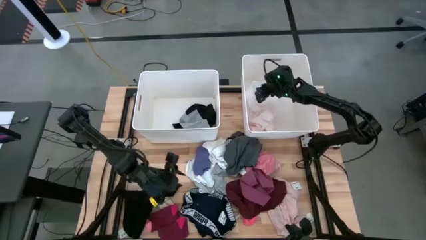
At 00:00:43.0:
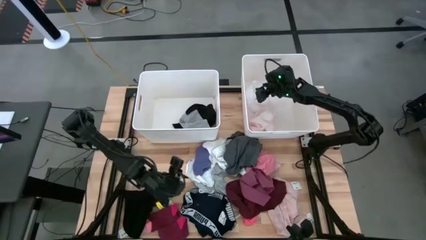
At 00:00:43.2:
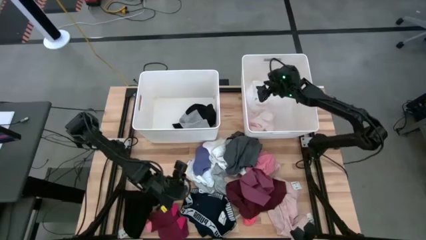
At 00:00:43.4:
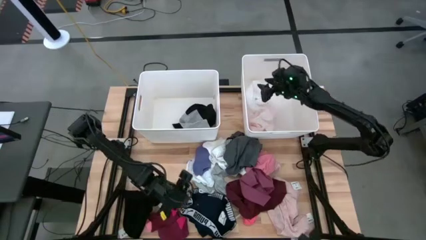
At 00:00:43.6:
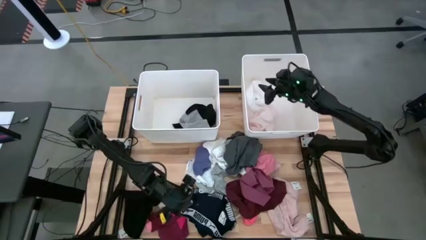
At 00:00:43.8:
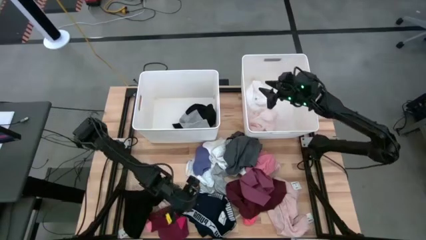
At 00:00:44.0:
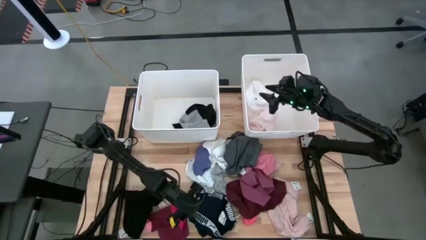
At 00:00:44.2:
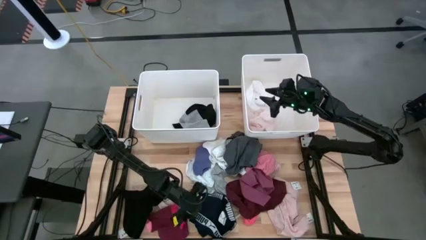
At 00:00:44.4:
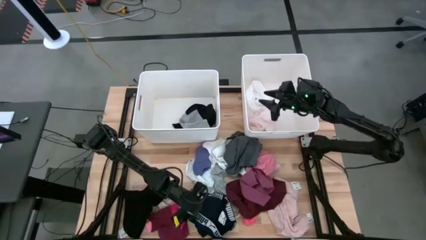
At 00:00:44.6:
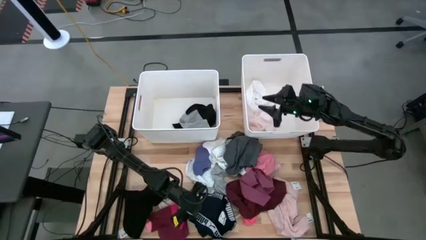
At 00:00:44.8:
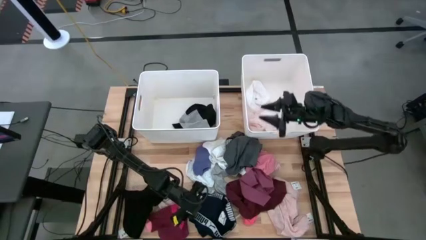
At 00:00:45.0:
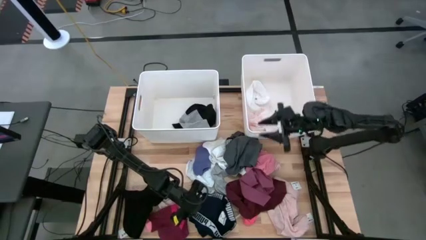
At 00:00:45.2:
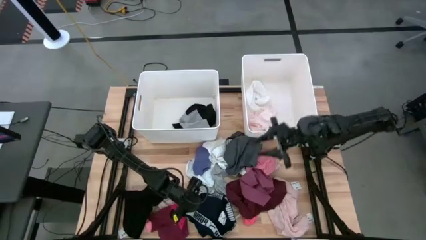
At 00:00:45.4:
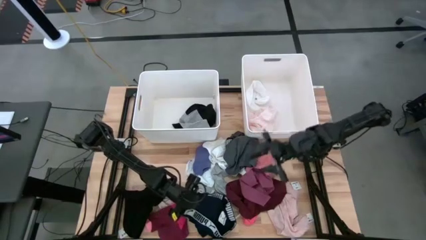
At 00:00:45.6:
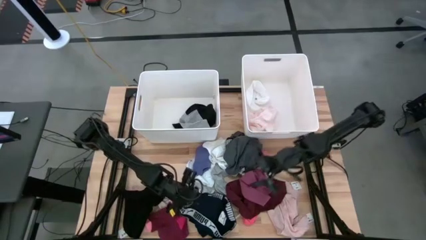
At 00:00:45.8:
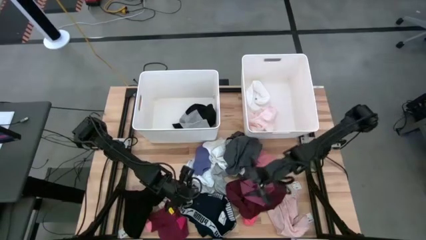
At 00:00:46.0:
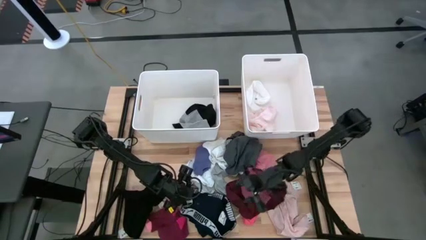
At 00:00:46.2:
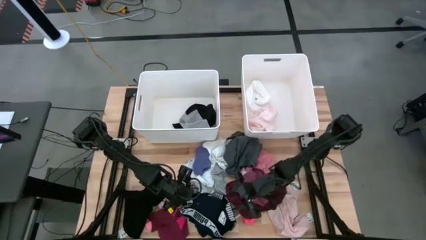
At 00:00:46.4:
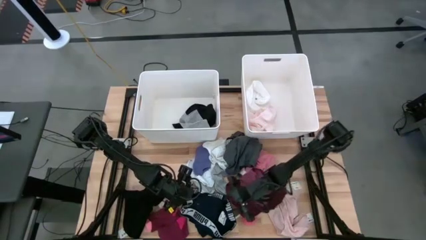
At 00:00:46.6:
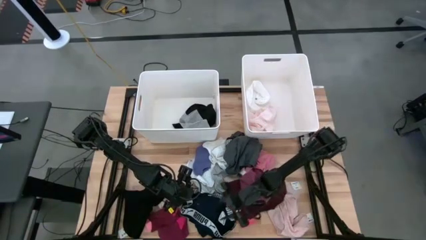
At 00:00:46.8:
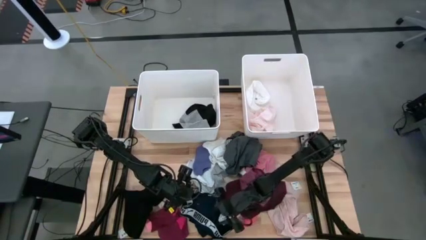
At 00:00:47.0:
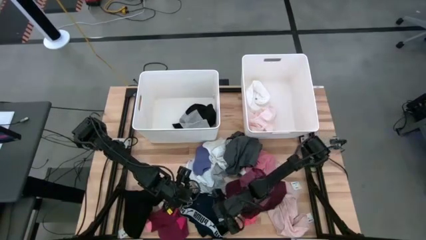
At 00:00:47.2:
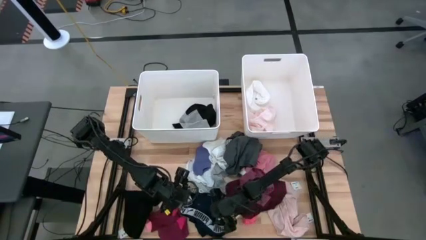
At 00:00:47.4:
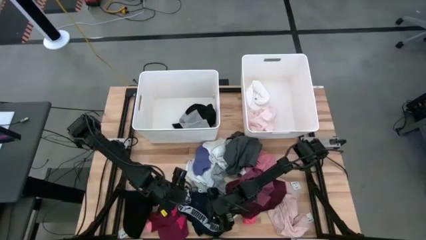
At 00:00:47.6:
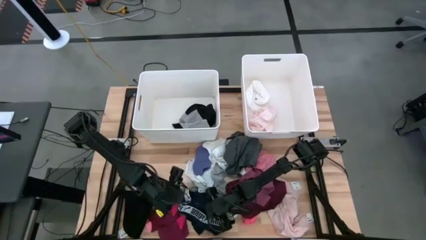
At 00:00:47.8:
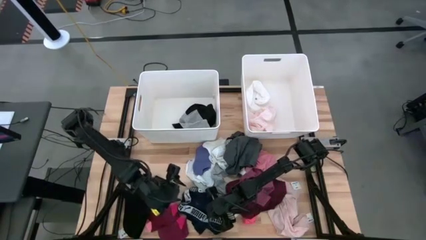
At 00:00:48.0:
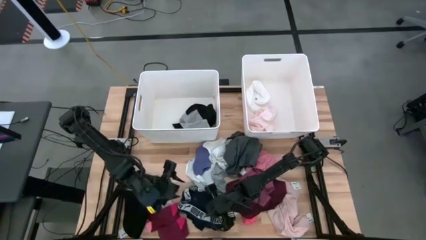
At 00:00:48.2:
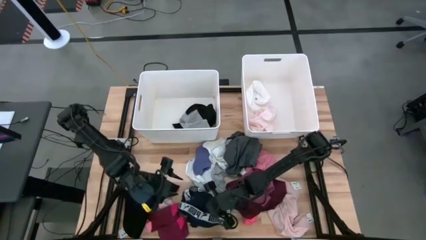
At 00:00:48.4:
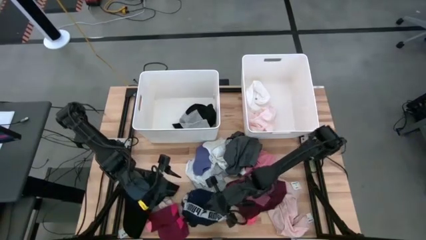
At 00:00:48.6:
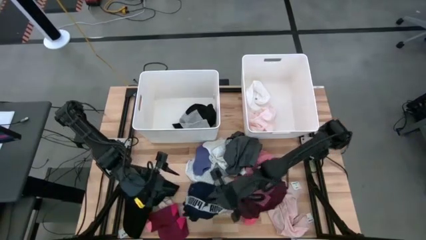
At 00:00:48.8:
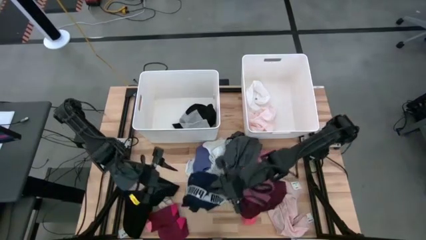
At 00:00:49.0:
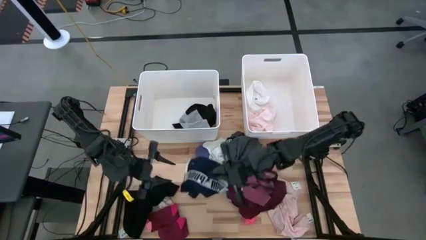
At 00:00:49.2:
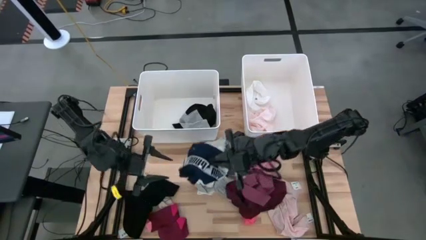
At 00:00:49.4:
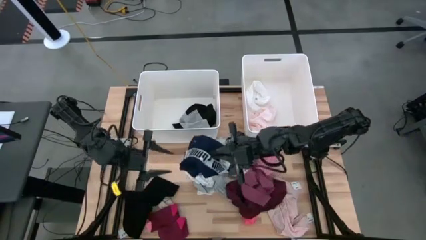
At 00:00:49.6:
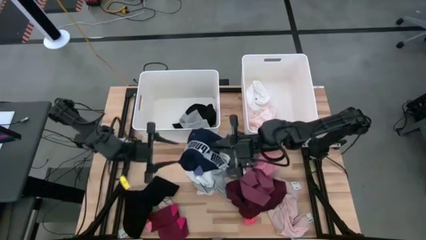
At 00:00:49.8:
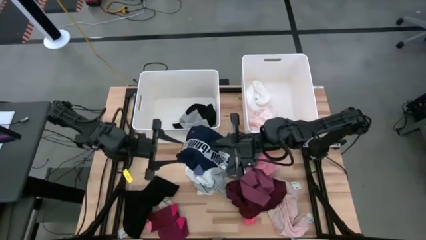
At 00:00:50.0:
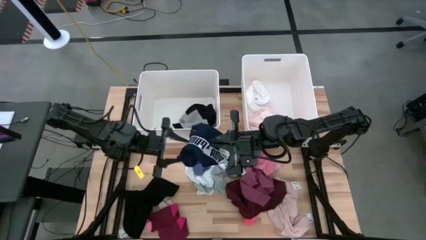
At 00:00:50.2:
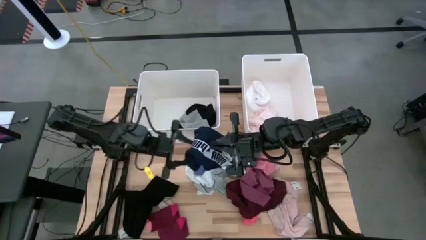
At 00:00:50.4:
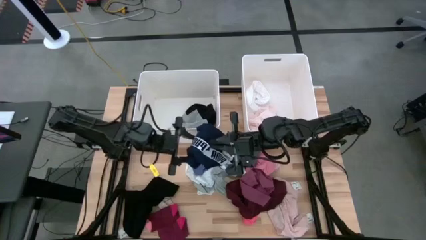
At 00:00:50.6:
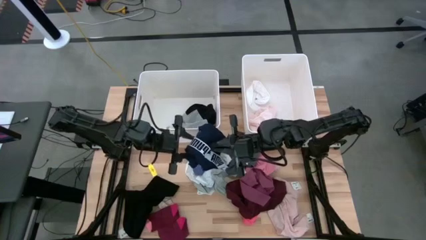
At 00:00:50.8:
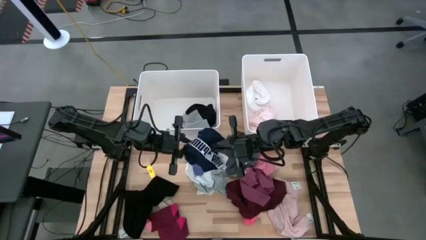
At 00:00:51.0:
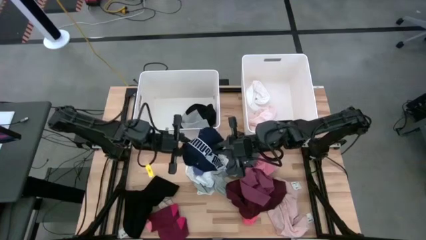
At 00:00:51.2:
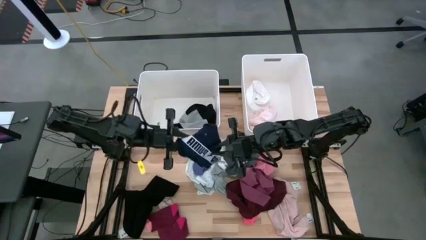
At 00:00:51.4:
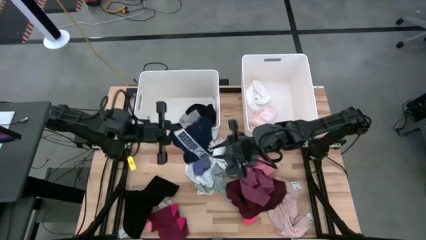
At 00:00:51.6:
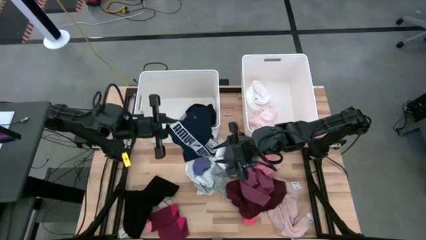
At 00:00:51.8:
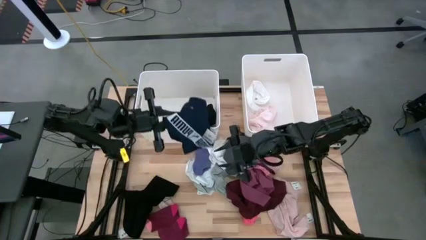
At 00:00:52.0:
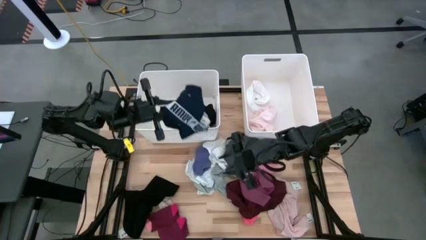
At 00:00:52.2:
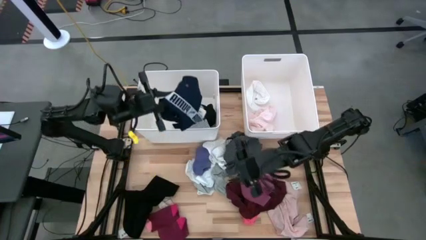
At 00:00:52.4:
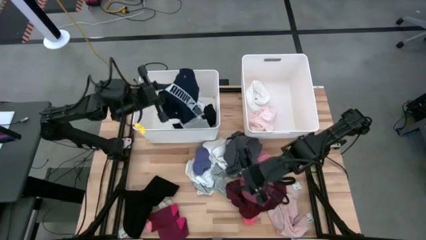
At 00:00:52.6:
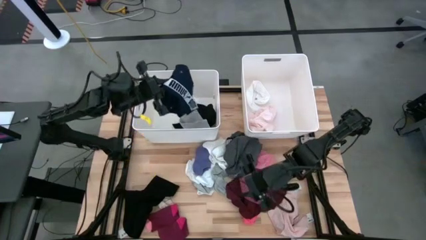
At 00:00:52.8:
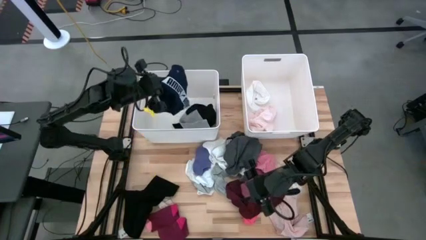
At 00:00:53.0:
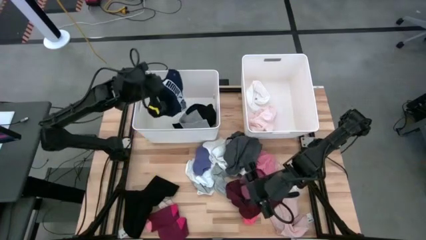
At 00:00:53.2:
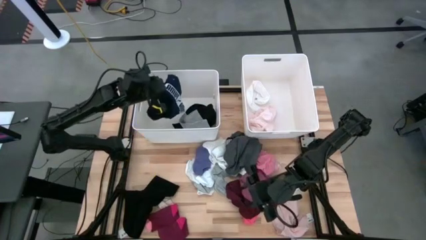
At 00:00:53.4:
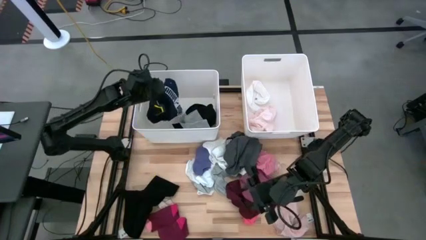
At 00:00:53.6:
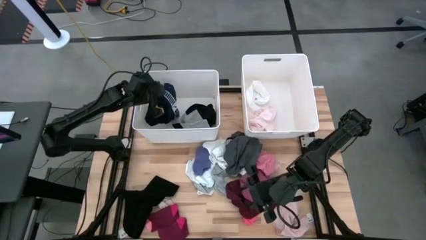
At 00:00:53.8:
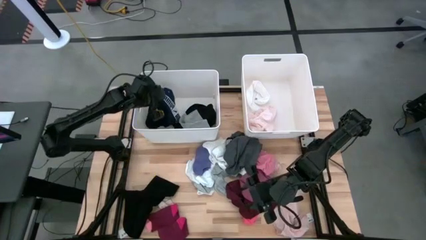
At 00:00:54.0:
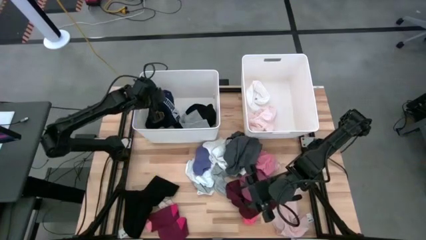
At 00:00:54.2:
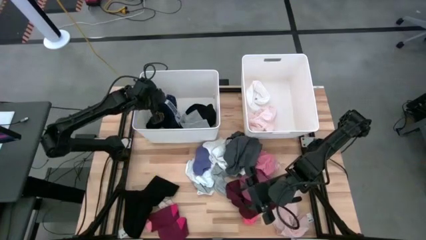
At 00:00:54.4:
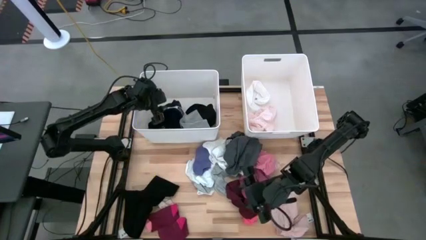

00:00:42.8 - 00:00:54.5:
Task: Sort clothes
Put the blue underwear into the left white laundry organizer
